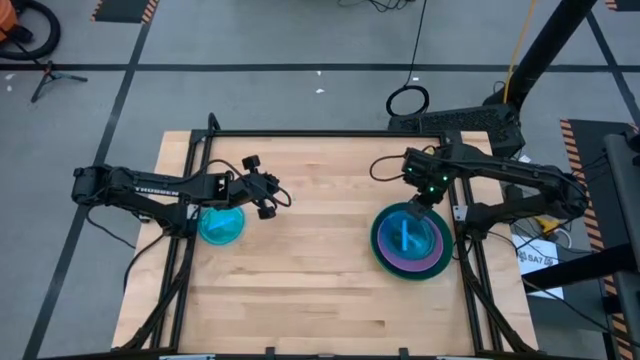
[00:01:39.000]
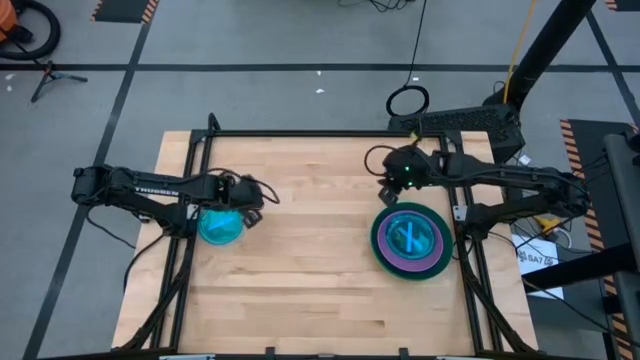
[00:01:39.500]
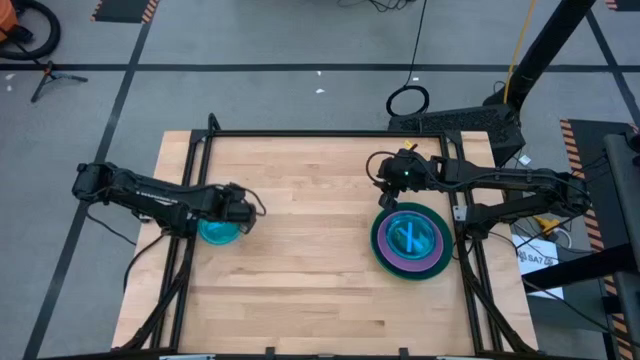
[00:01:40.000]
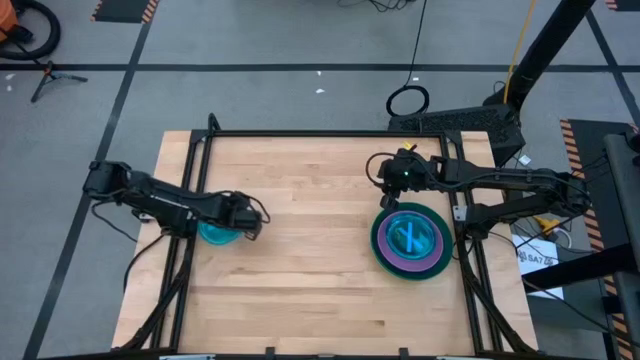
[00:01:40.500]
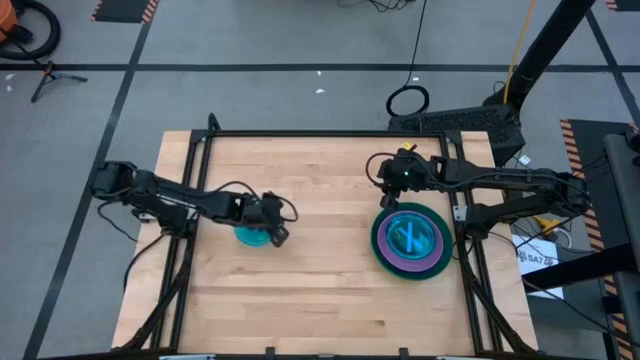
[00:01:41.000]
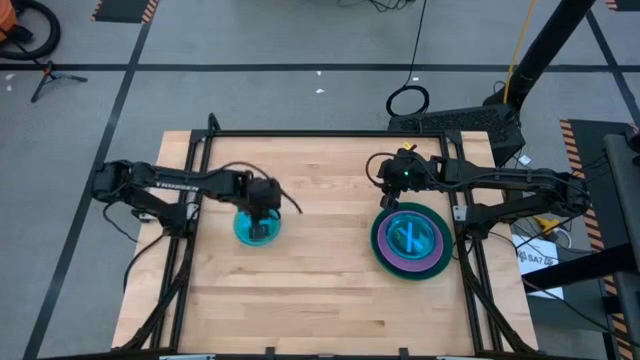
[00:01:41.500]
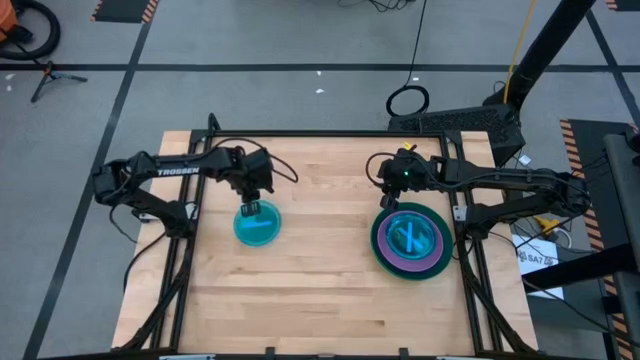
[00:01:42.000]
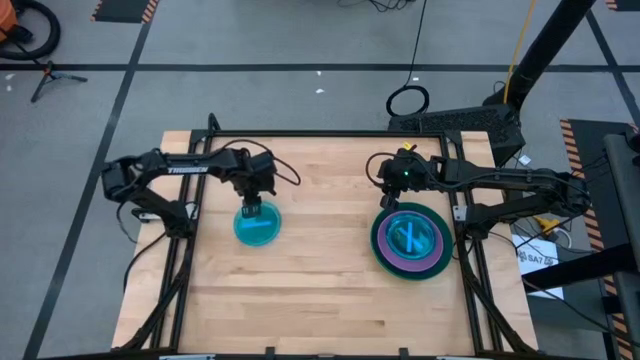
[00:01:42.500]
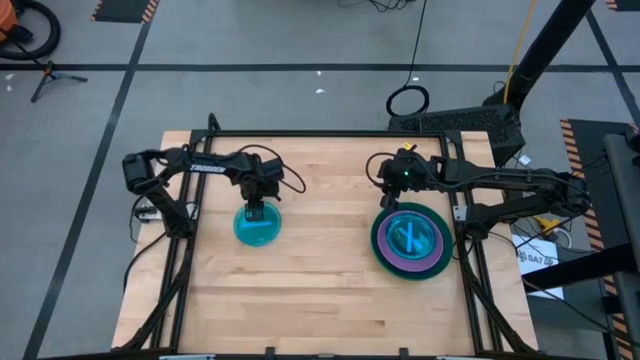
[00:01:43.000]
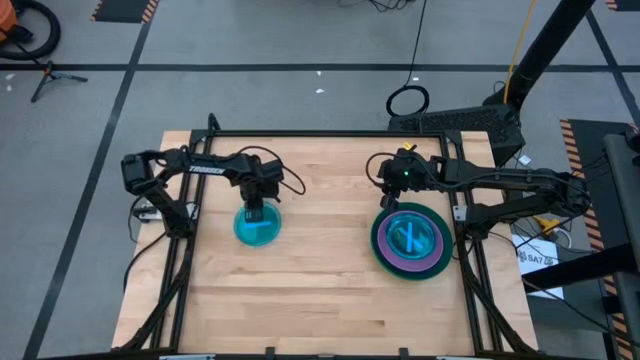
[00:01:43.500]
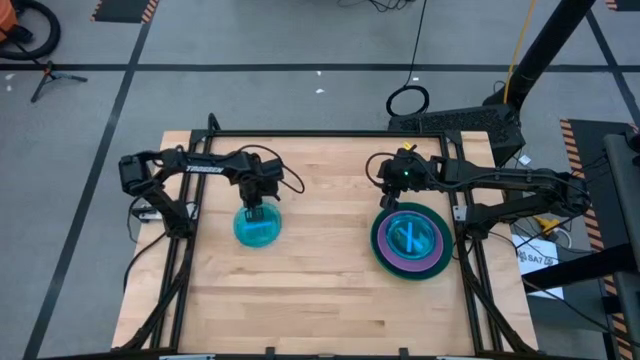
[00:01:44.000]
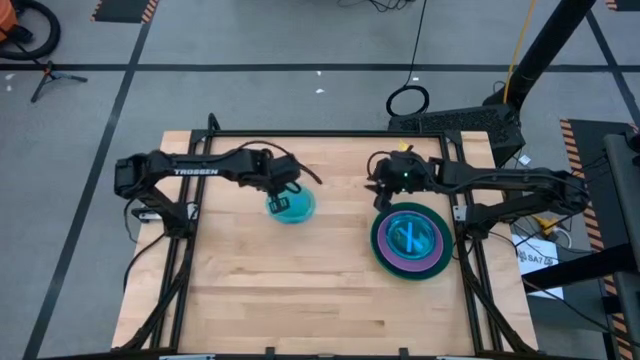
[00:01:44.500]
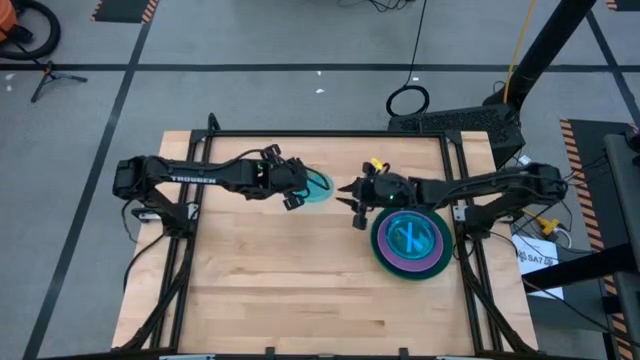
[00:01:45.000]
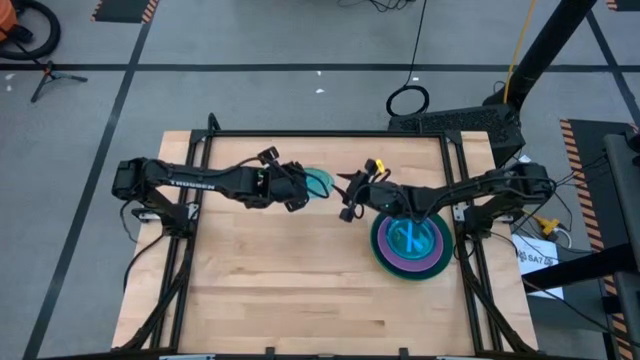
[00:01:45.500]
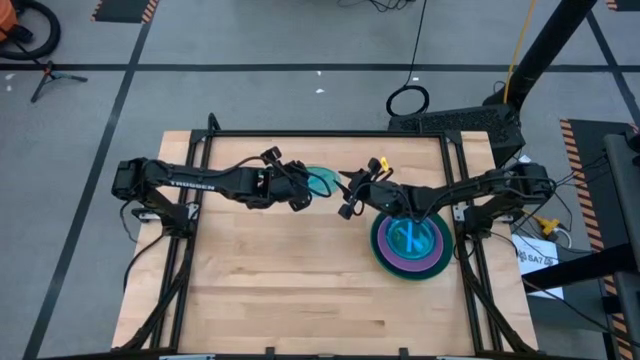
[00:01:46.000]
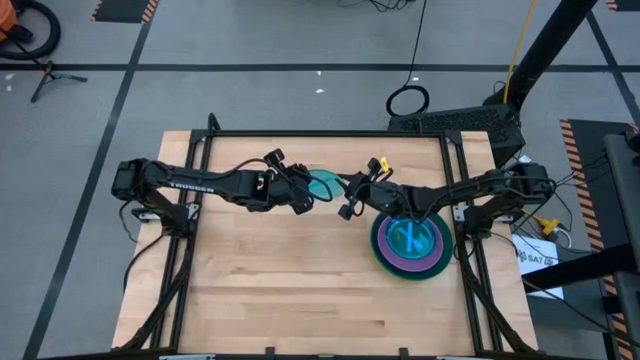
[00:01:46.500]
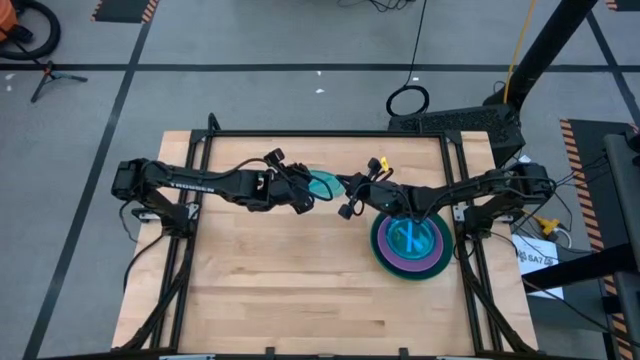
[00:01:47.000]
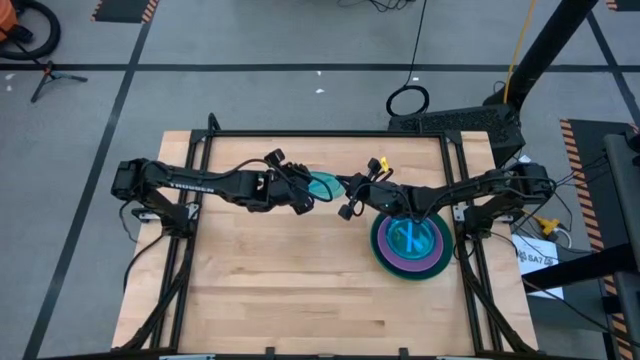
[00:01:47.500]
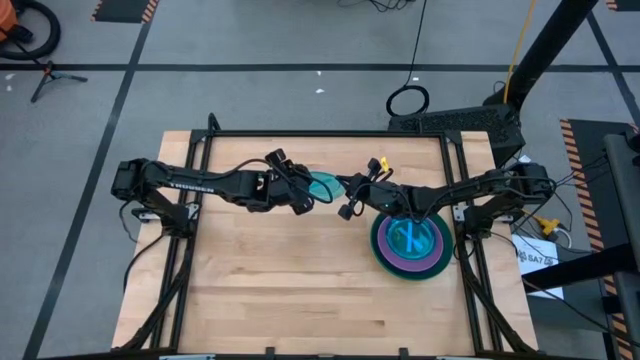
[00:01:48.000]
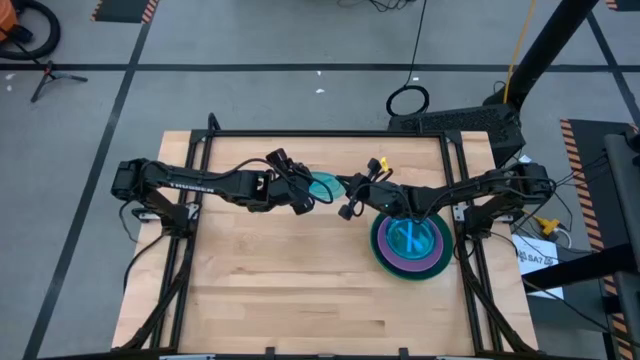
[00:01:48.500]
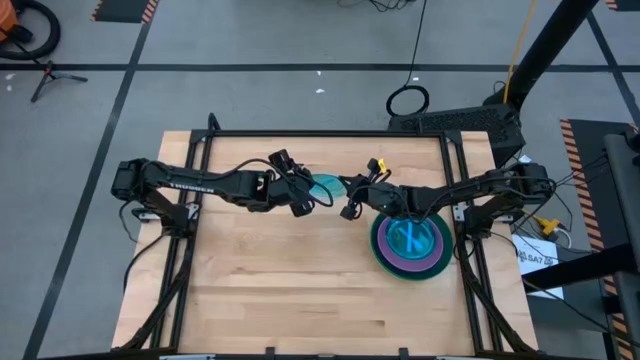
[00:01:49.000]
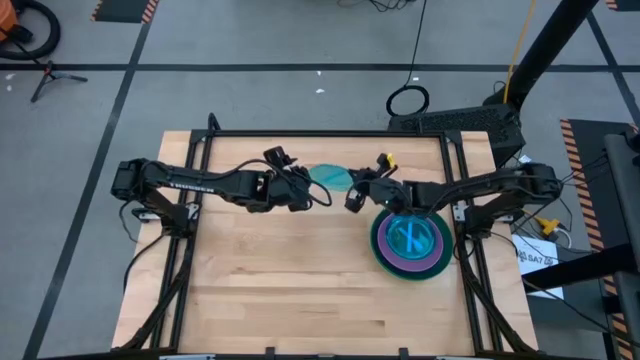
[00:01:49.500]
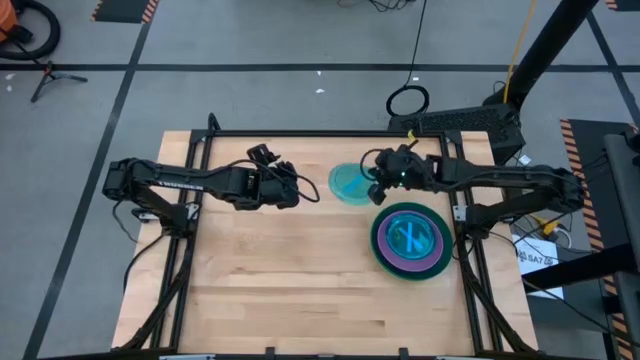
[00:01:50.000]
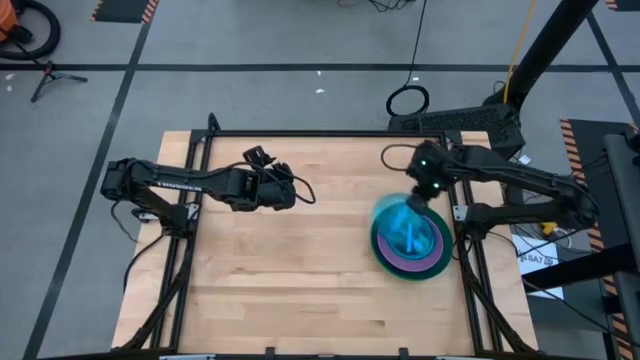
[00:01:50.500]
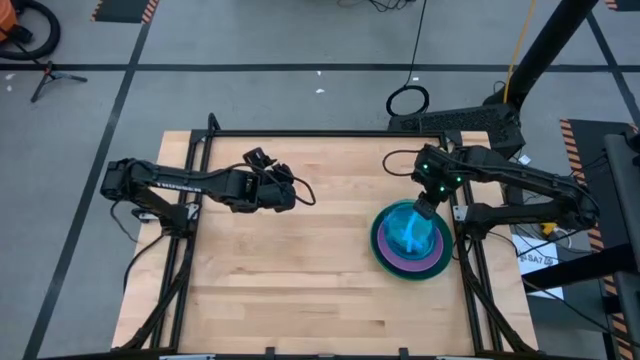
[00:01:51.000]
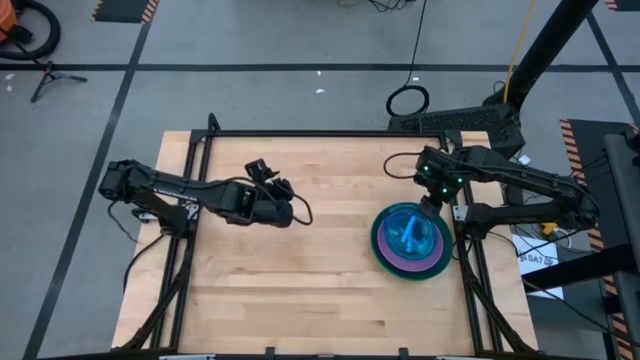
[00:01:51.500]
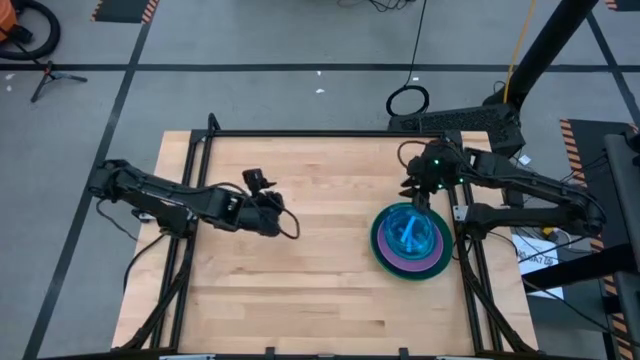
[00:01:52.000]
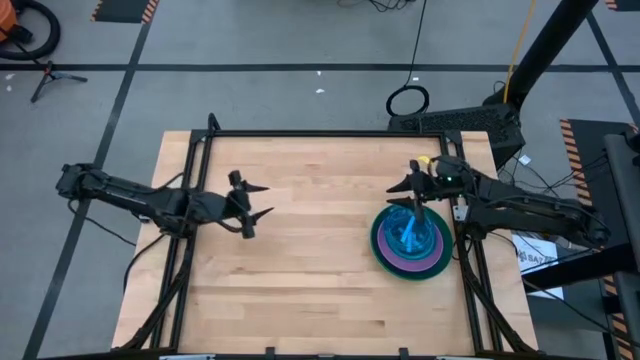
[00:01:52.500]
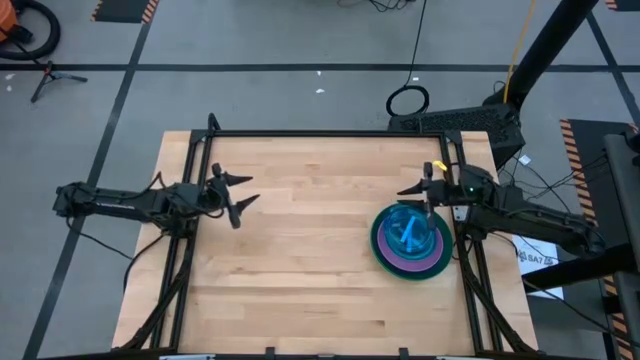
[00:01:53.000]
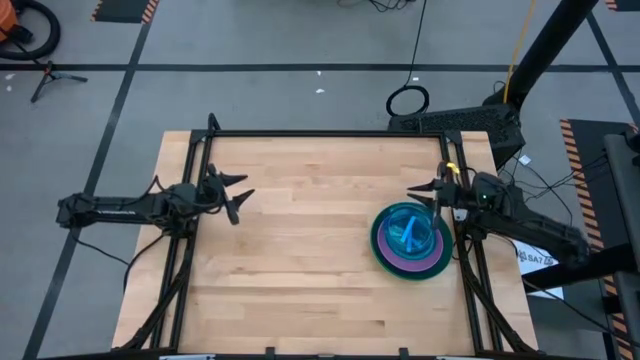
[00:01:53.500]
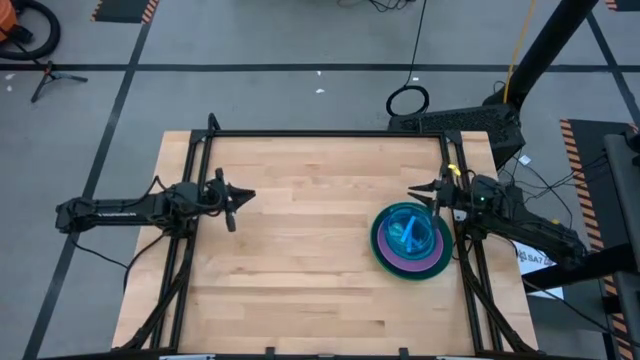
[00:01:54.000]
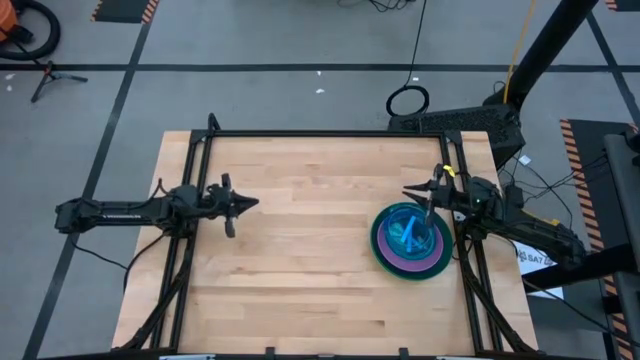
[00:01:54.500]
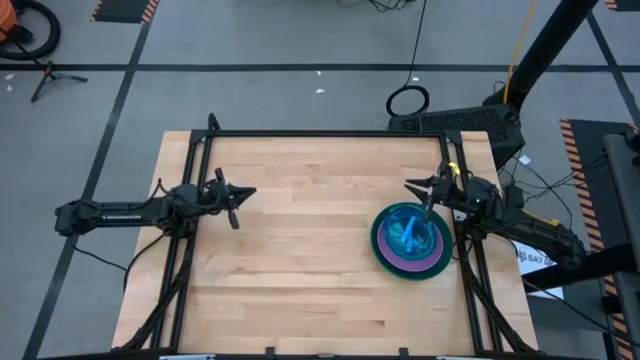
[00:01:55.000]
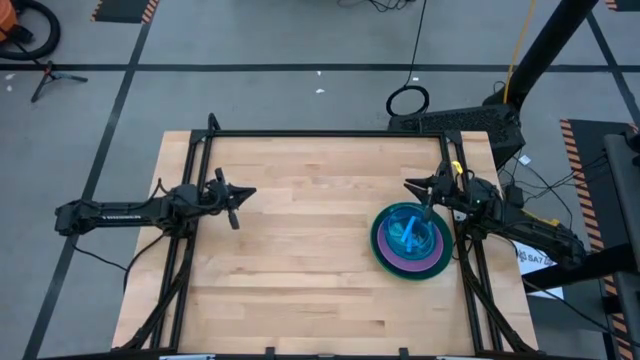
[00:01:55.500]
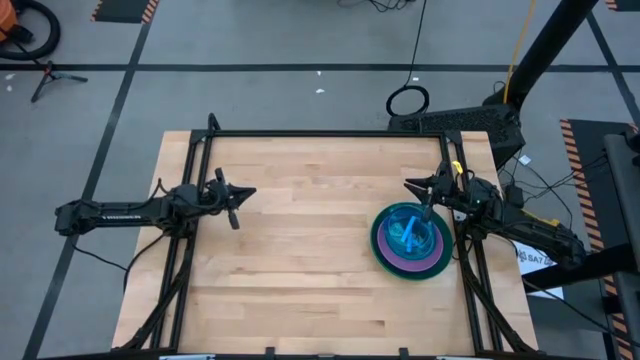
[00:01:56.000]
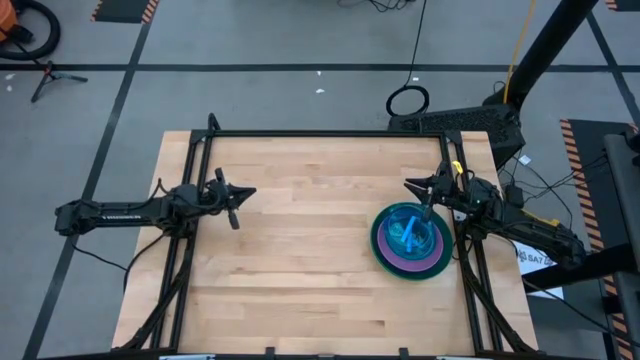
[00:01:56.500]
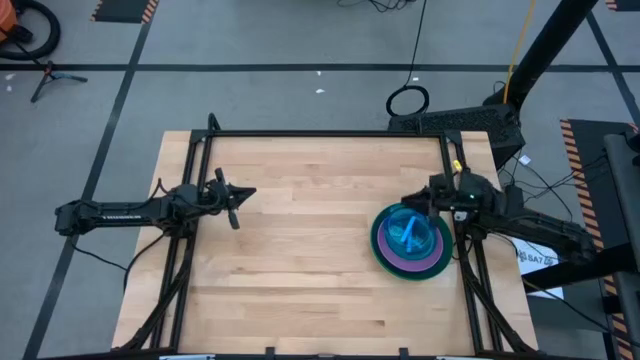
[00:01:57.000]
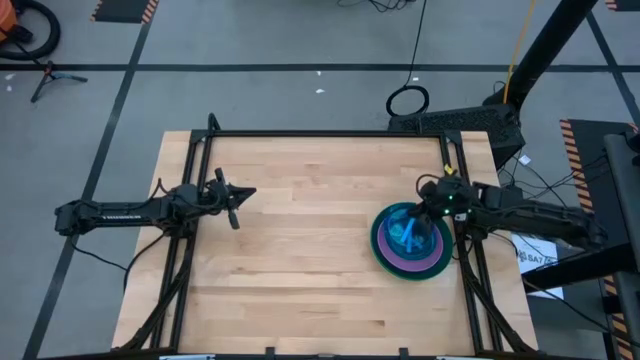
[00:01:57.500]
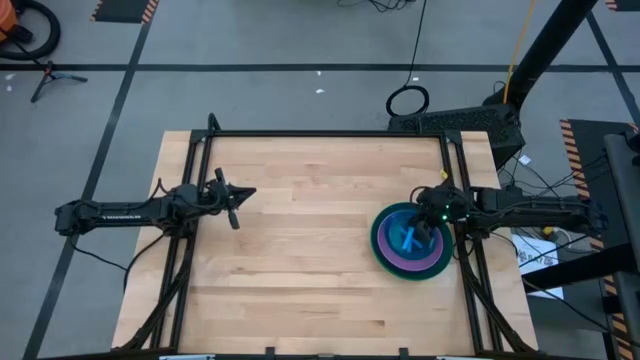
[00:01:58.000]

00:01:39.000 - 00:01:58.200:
Task: Stack plastic plates
Stack the blue plate on top of the other blue plate

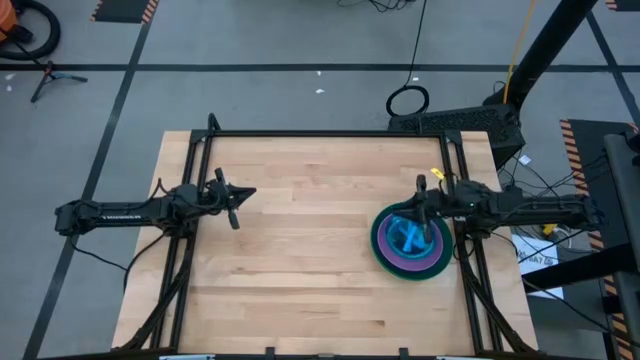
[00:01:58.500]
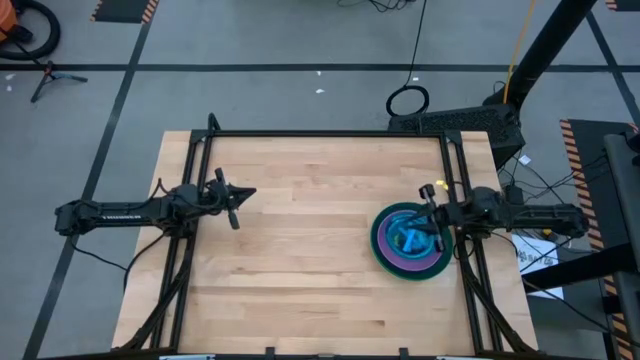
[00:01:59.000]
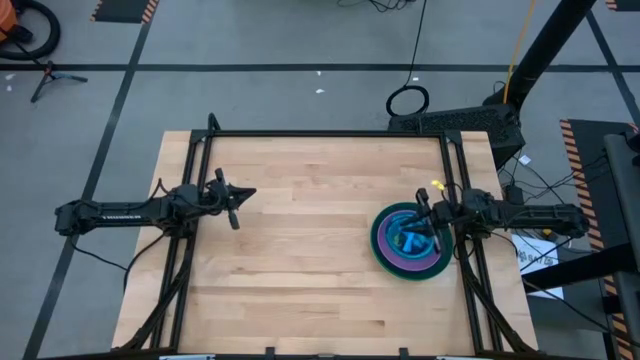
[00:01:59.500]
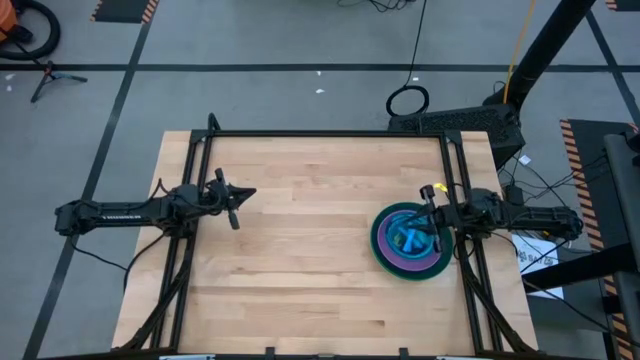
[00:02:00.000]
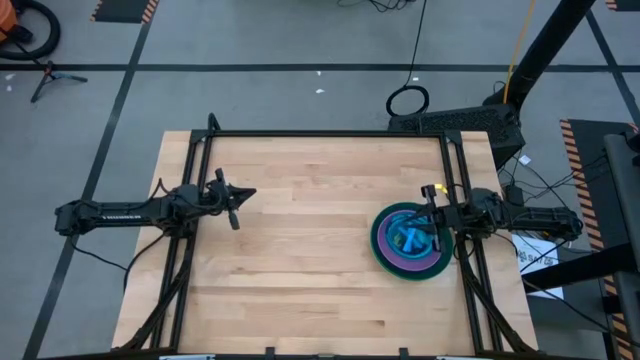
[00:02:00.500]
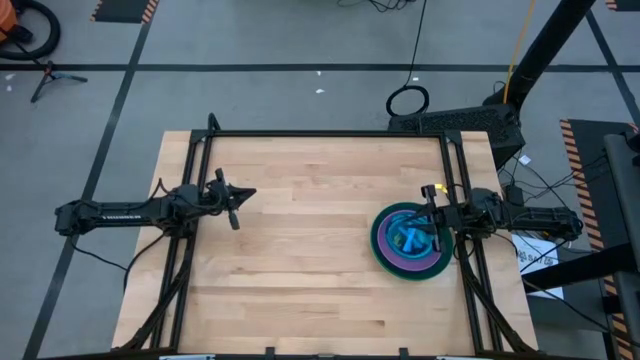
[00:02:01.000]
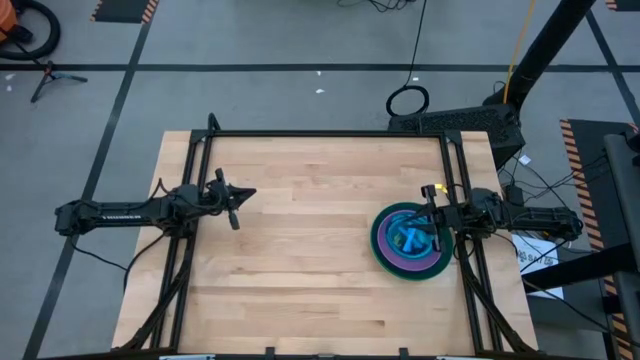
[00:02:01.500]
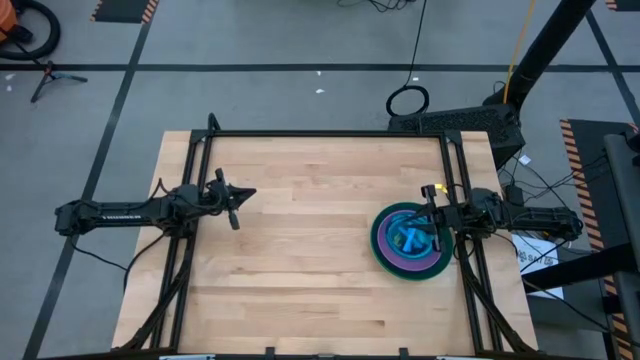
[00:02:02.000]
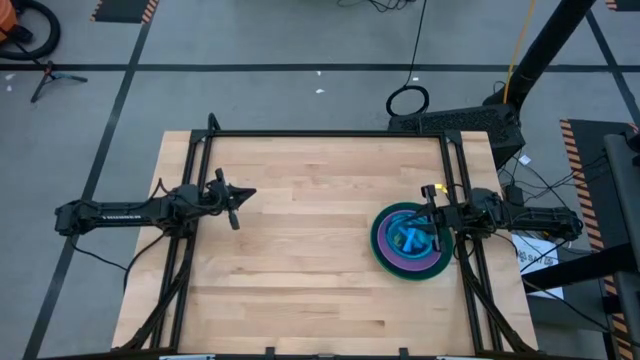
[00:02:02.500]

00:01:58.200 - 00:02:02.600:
Return to Home Position
